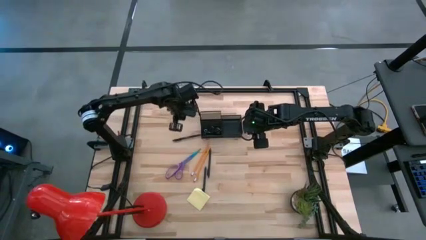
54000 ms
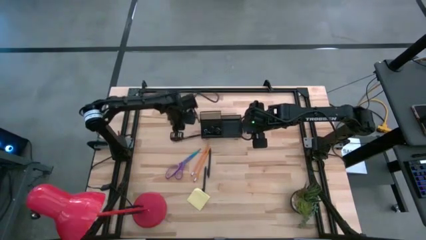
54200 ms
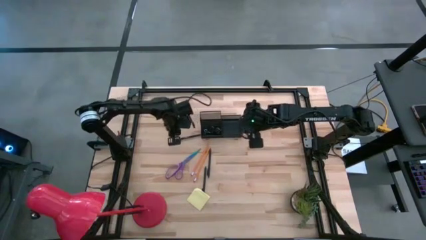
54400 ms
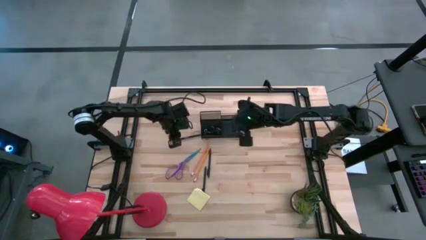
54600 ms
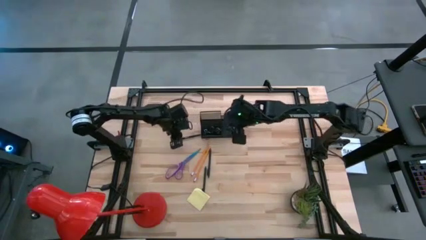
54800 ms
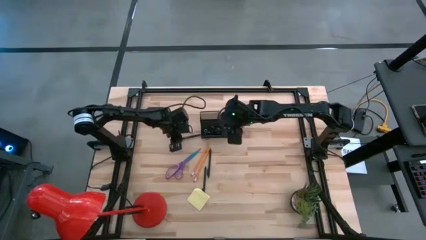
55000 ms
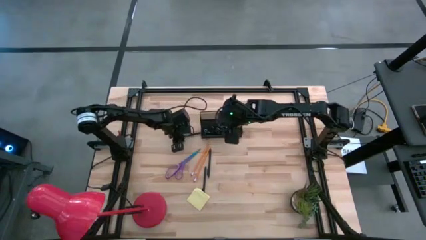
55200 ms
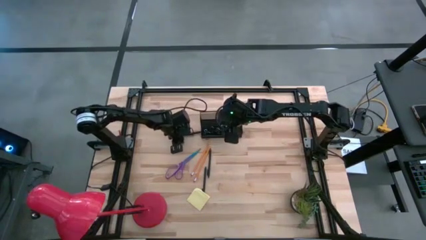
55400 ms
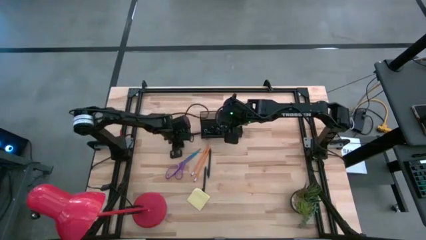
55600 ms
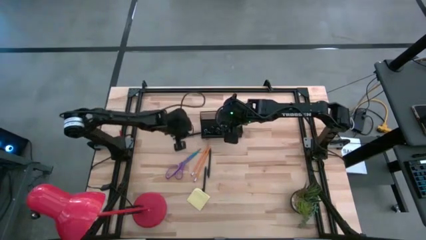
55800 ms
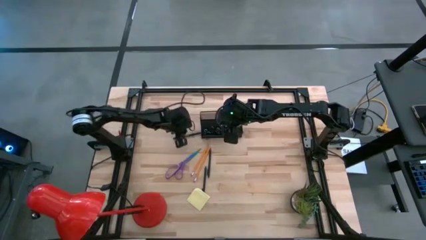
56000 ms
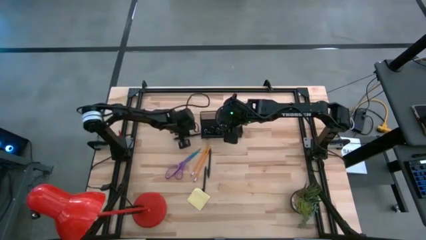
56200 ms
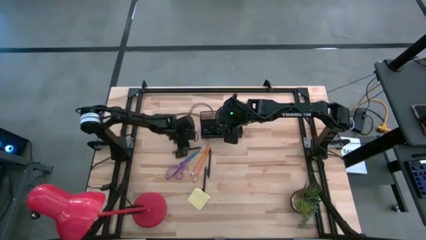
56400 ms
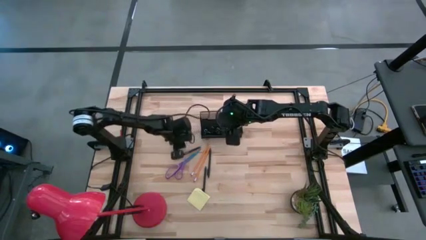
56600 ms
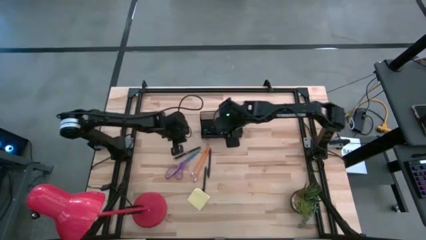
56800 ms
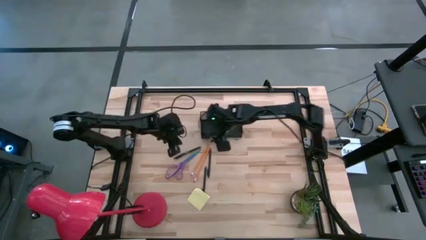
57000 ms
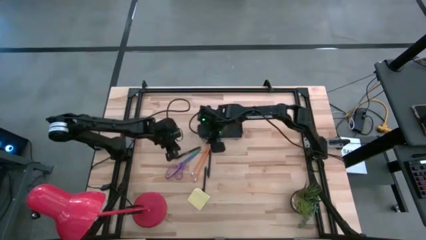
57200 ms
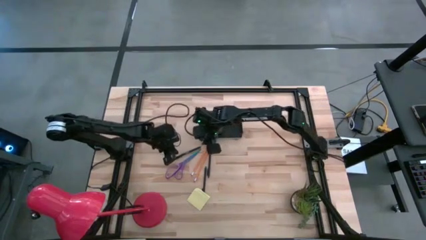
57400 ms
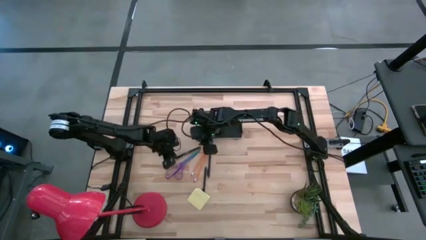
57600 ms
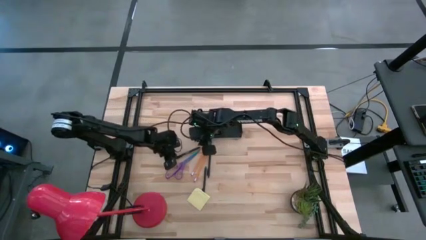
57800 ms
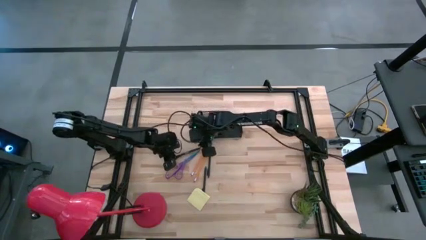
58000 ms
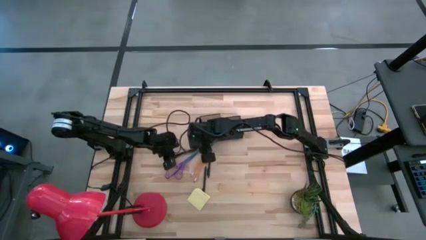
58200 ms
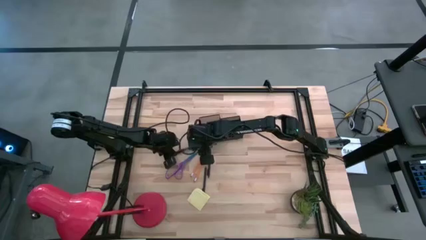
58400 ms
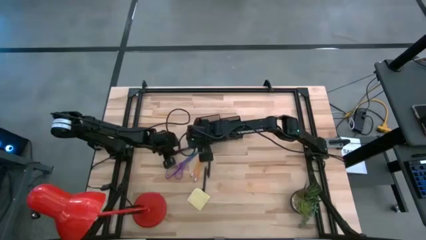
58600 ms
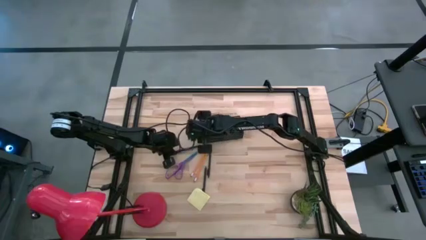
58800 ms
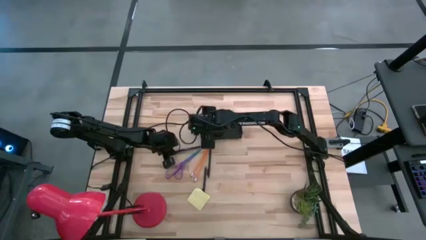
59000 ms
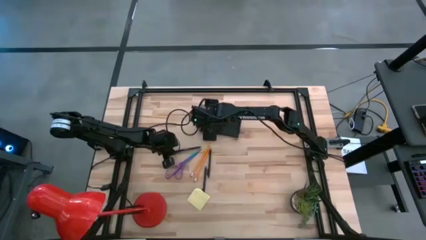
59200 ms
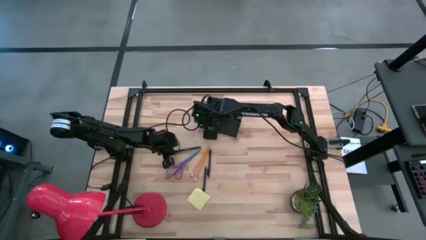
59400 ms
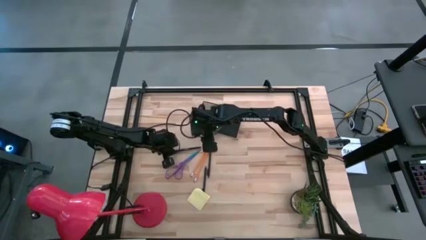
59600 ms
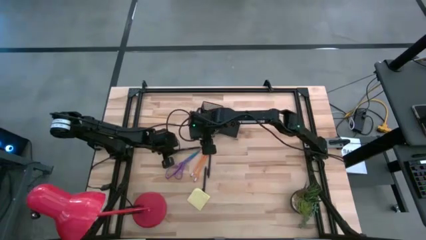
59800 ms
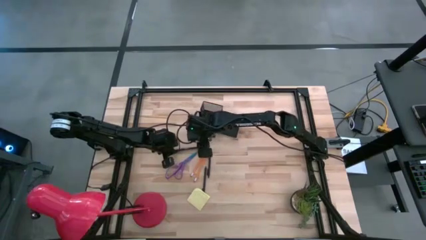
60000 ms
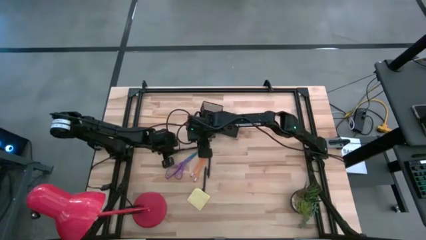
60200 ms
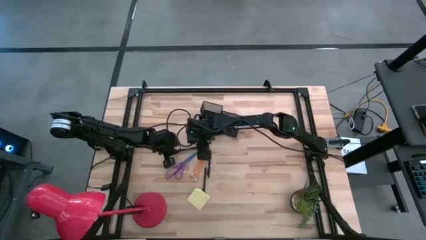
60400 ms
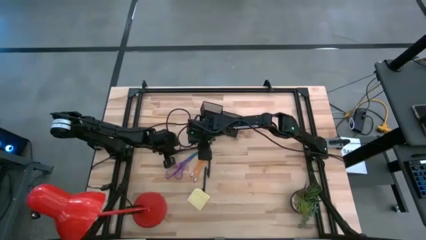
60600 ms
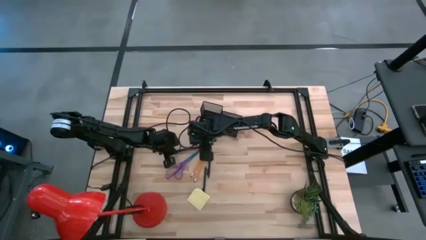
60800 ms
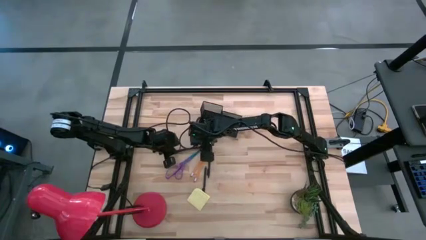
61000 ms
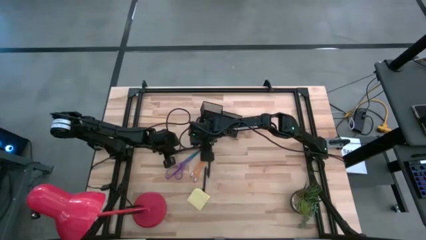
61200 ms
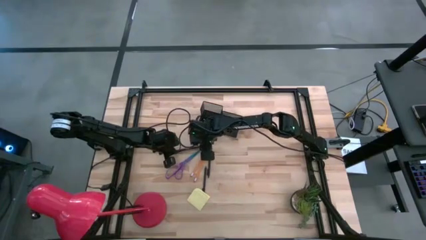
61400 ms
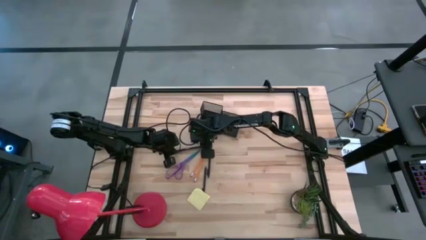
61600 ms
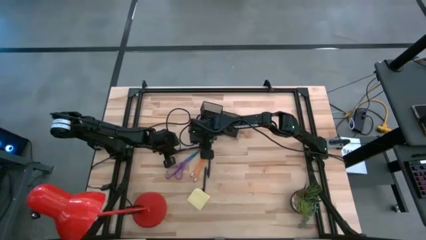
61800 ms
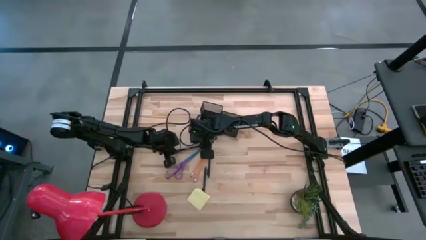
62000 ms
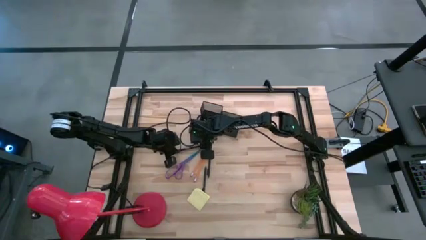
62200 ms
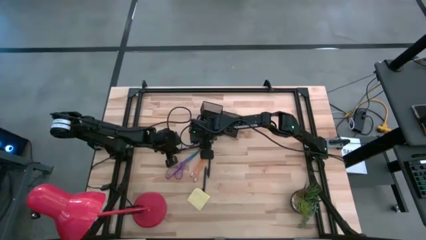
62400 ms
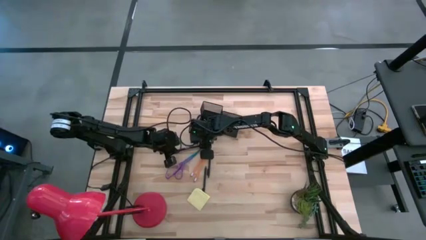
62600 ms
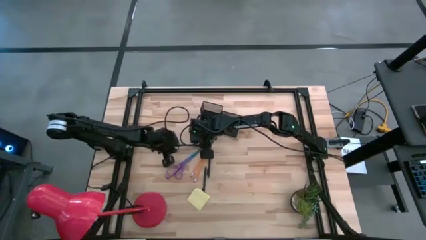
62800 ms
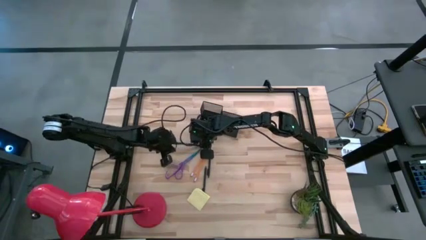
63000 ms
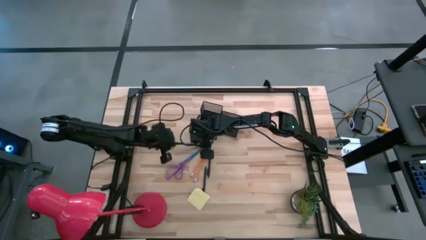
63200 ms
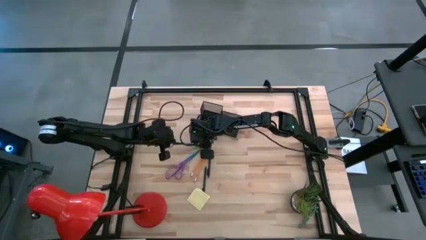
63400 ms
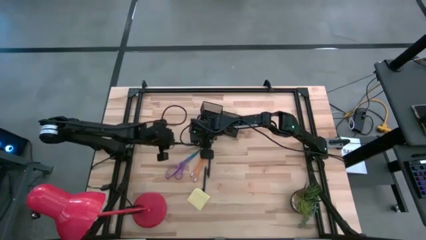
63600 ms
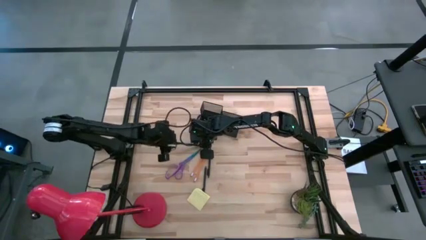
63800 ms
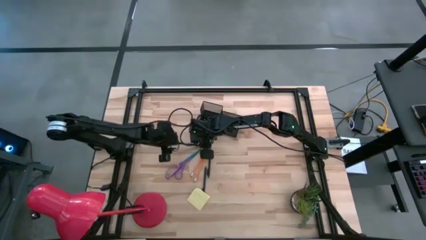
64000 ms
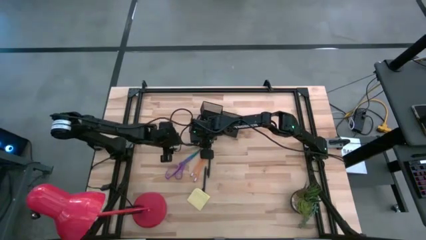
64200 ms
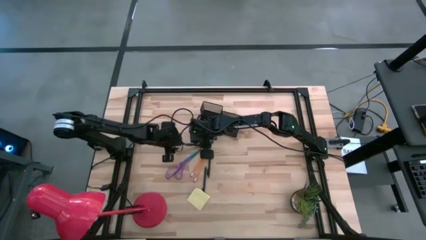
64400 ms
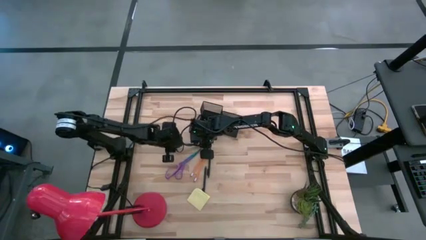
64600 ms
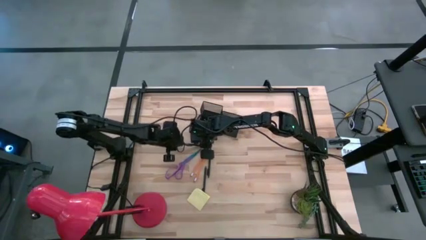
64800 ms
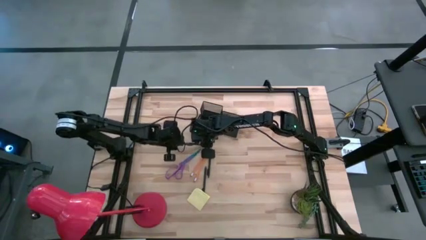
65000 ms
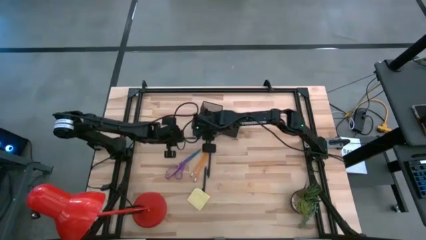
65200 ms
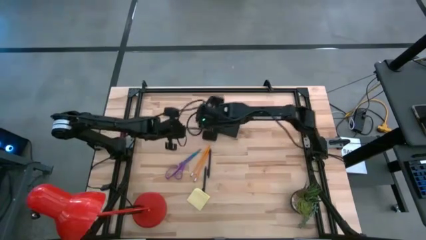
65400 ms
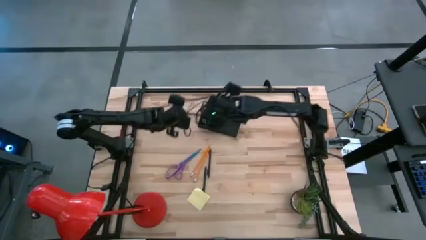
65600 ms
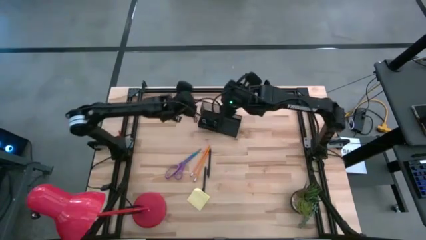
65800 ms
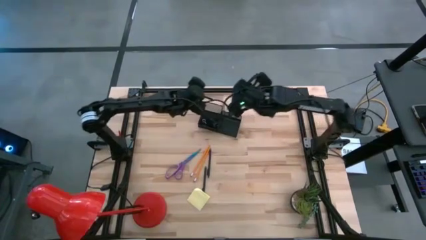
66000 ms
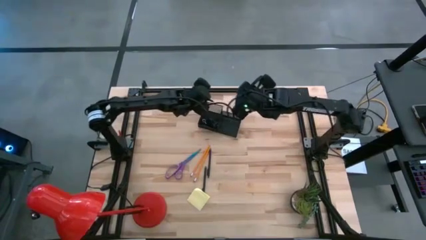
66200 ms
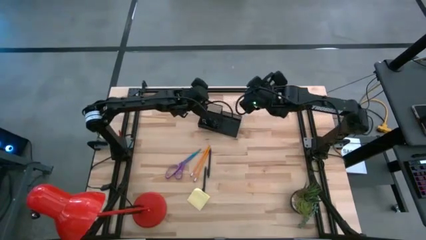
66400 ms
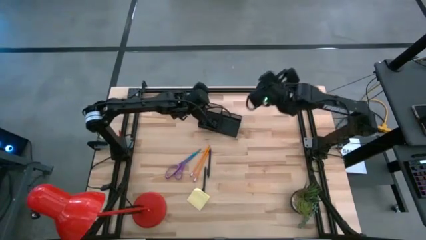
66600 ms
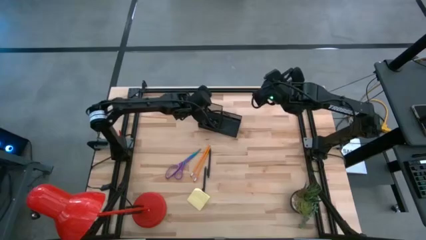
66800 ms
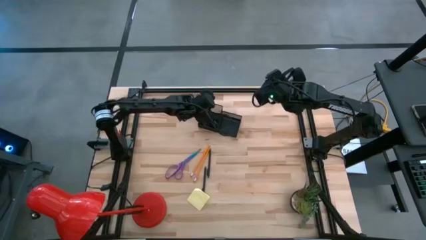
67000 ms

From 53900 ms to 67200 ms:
Task: Pick and place office supplies into organizer
Put the top black pen into the black desk organizer
